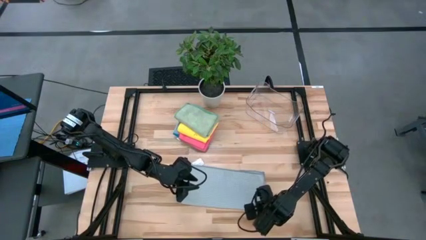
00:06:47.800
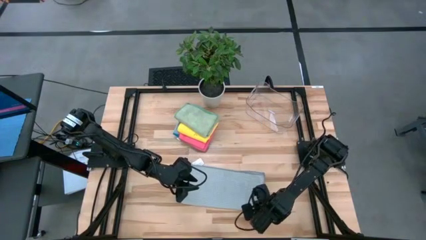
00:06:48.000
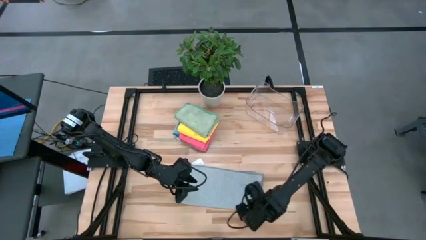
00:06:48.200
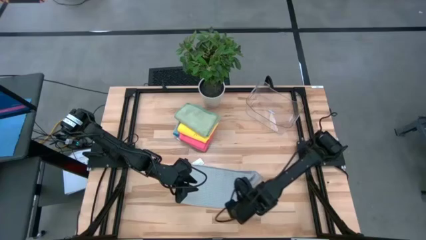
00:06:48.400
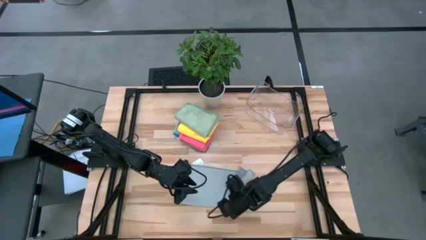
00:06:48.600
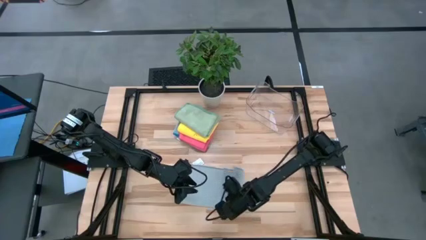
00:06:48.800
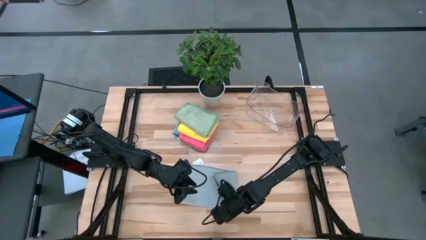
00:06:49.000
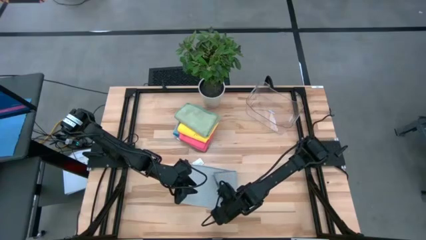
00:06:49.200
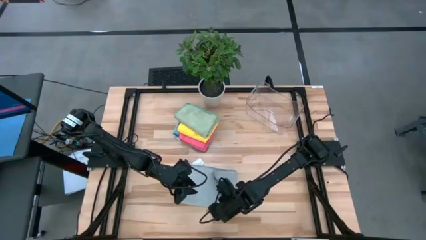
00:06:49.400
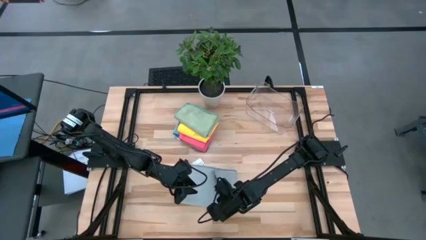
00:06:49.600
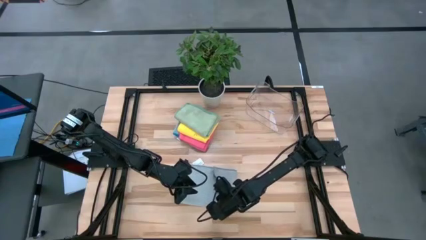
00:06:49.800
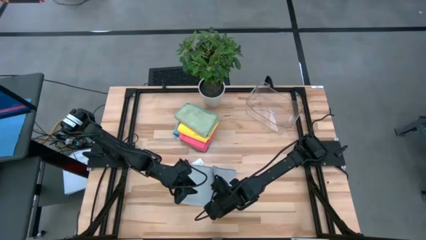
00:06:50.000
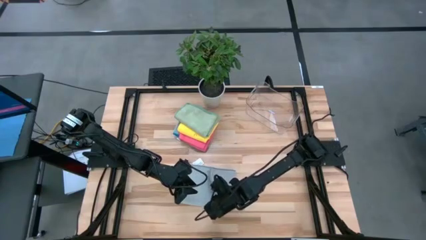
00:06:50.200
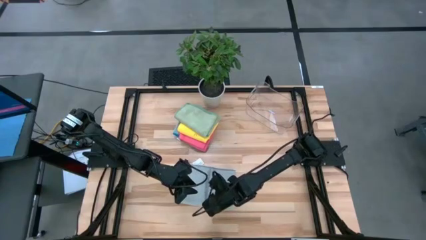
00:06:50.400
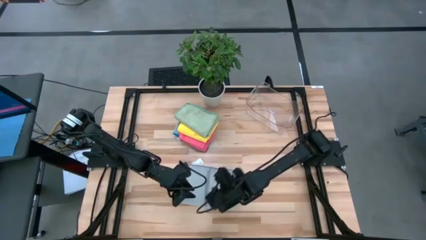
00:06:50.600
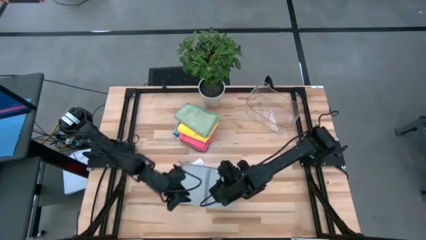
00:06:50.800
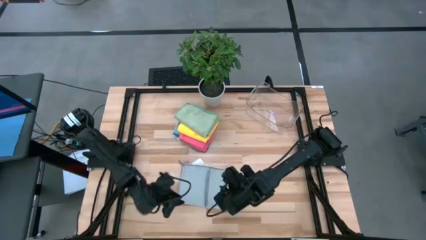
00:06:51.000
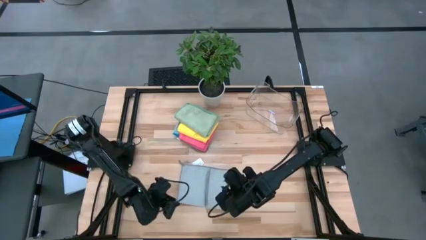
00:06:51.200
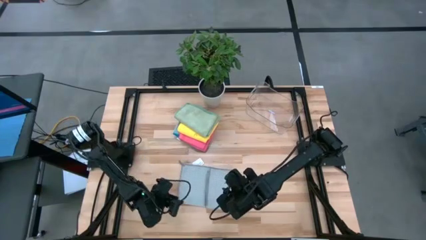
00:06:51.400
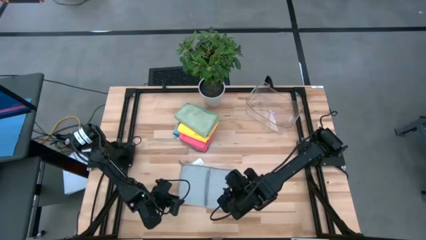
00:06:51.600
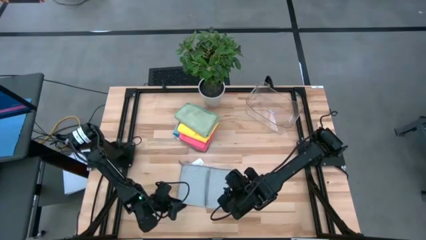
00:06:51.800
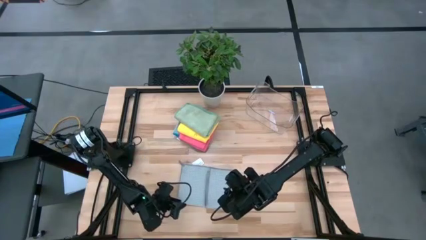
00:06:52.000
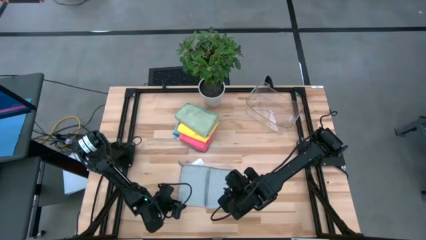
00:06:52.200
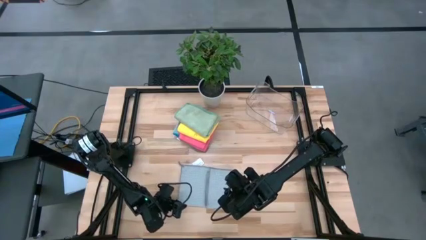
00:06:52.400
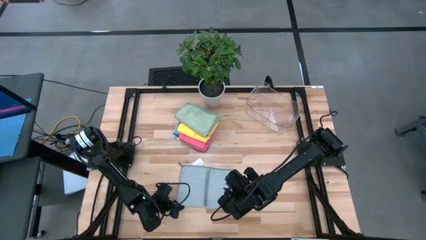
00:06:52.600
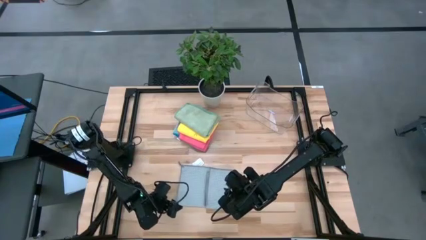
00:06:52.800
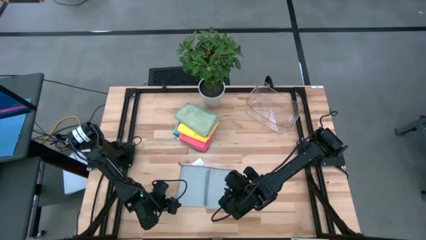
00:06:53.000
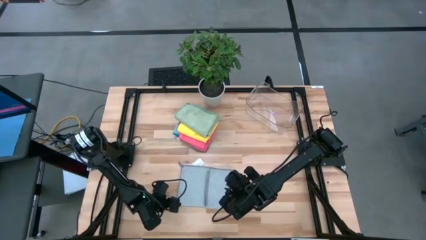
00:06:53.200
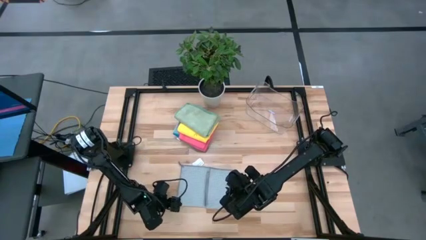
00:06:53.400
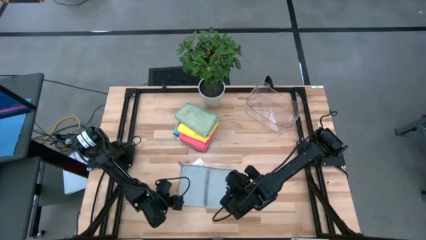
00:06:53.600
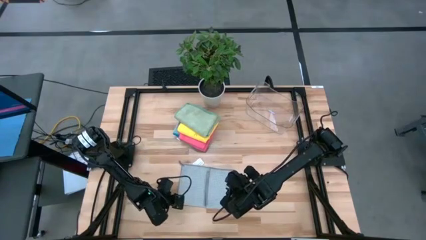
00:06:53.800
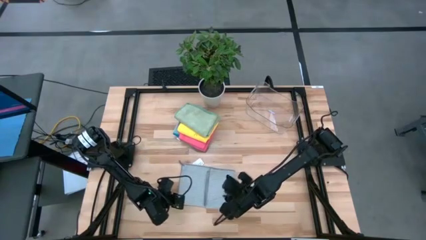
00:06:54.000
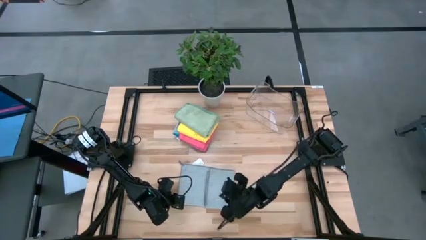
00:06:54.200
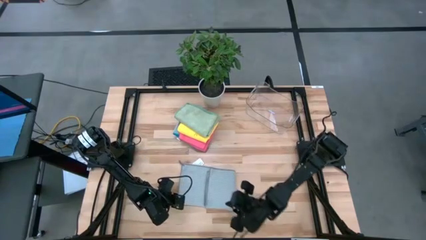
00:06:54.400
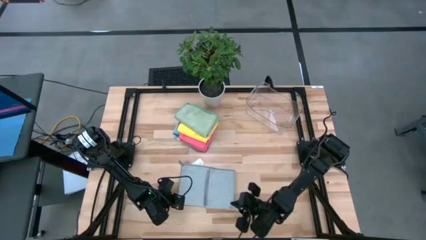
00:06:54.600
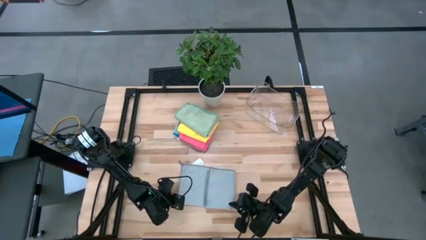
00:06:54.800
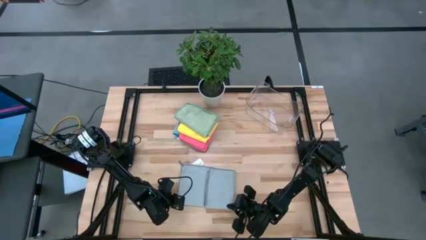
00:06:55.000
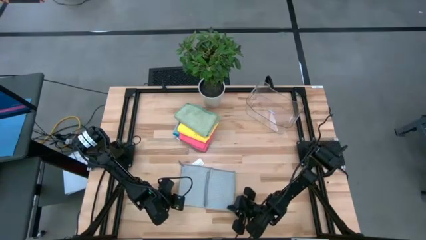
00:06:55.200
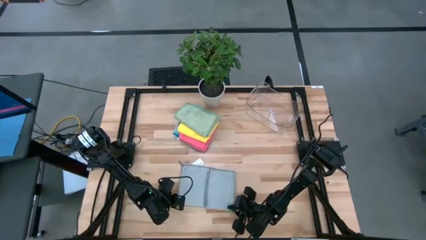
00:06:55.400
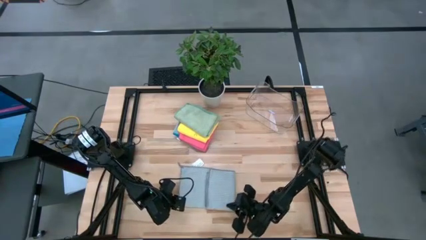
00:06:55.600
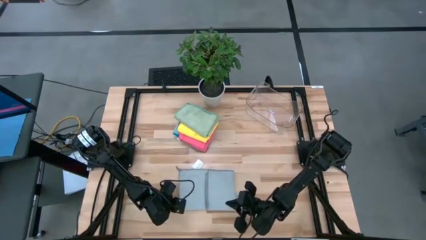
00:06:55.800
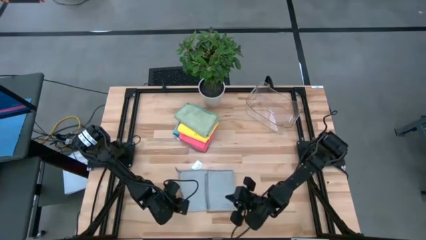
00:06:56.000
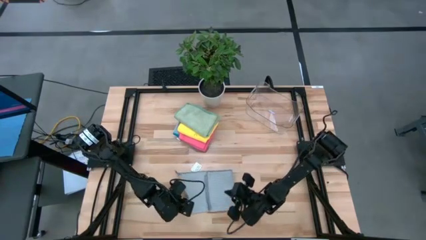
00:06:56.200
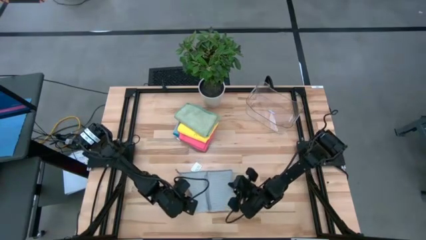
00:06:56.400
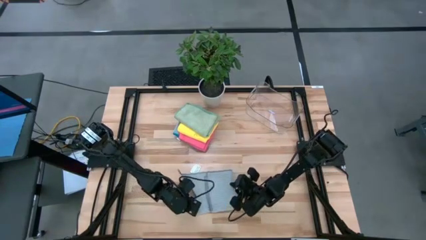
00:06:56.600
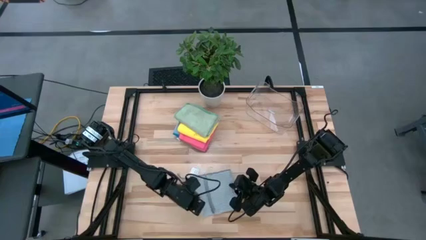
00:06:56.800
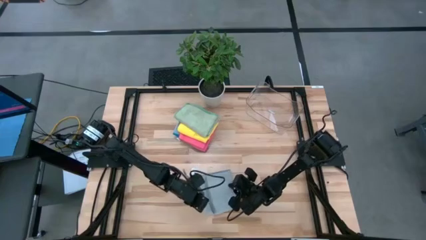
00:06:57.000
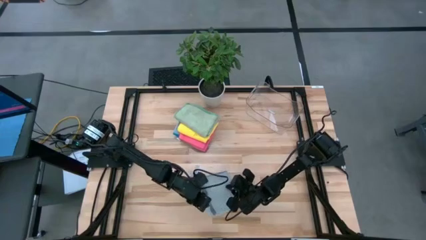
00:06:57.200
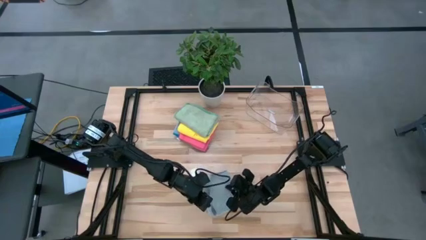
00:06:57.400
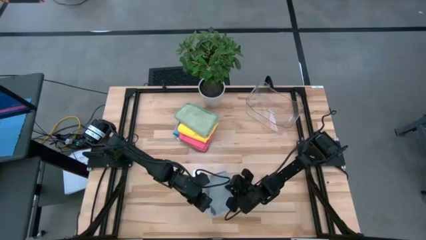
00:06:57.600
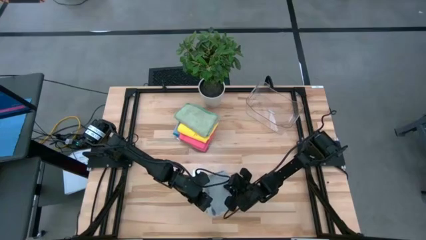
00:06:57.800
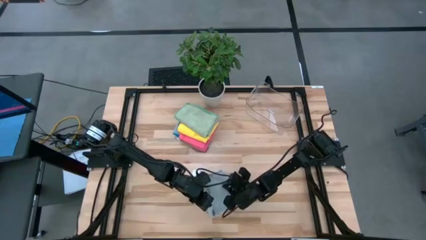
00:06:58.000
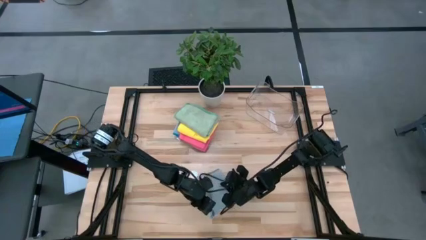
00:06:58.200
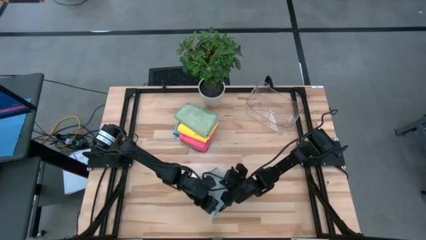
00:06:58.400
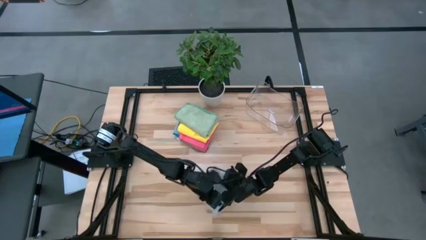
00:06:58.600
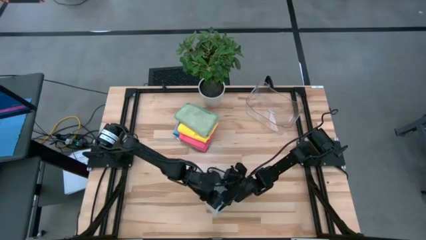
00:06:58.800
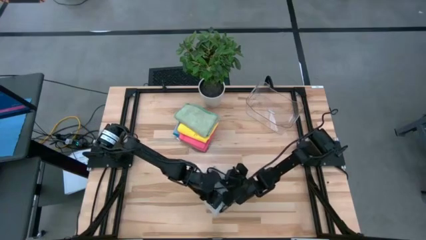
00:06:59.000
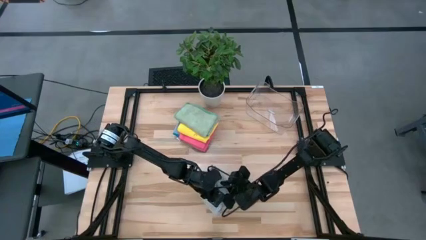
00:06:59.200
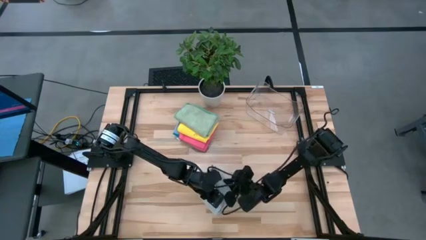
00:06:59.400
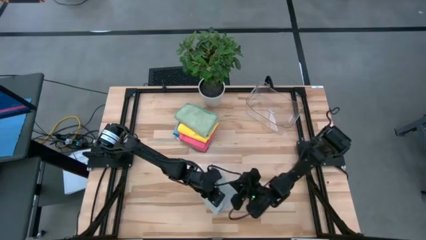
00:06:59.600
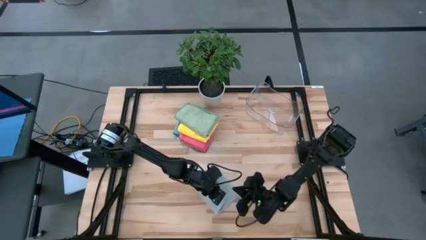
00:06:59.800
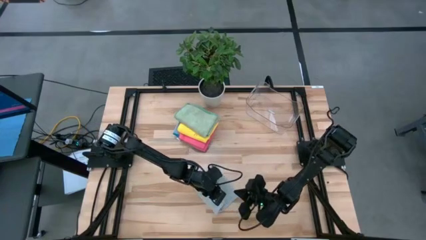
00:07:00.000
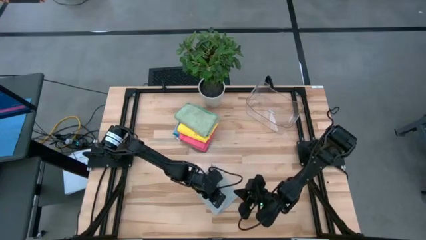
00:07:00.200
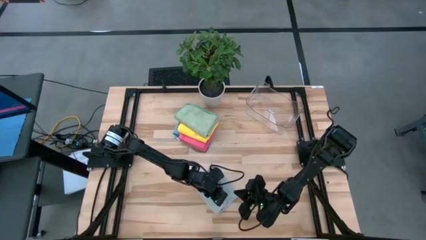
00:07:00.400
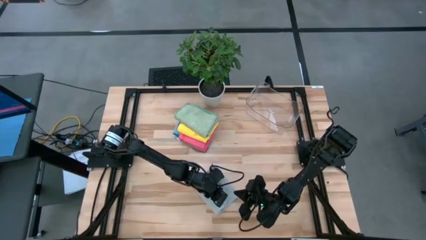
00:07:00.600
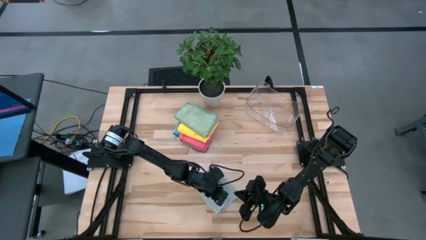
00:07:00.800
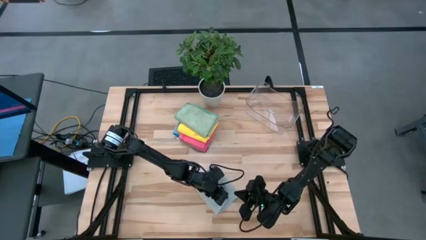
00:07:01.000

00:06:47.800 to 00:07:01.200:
Task: Fold microfiber towels
Fold the gray microfiber towel

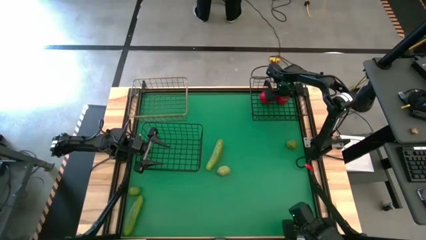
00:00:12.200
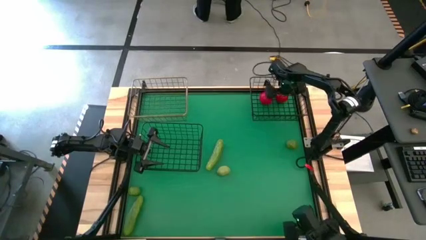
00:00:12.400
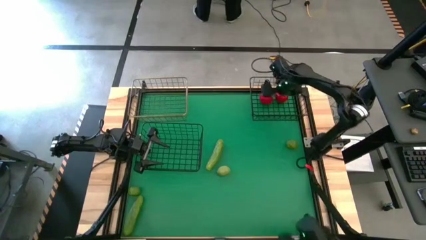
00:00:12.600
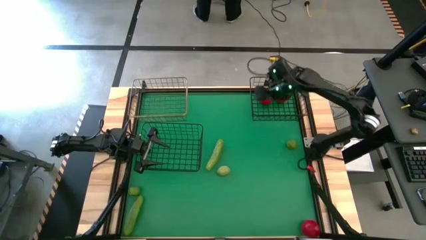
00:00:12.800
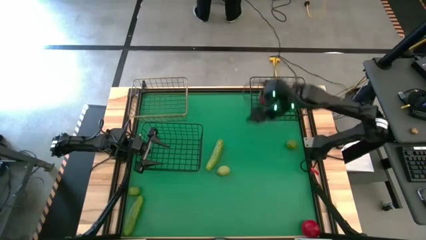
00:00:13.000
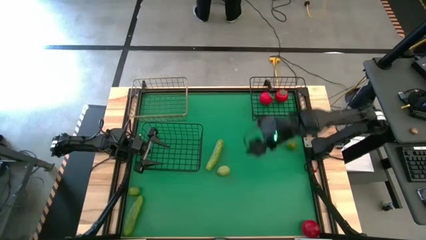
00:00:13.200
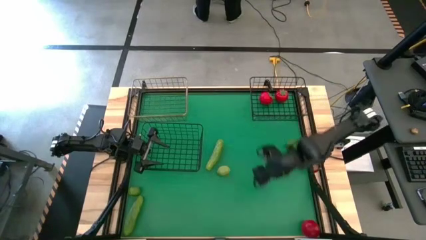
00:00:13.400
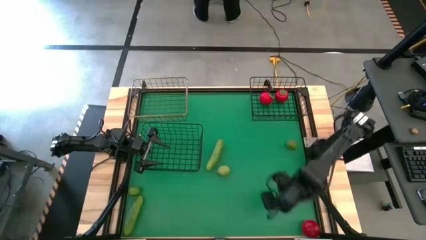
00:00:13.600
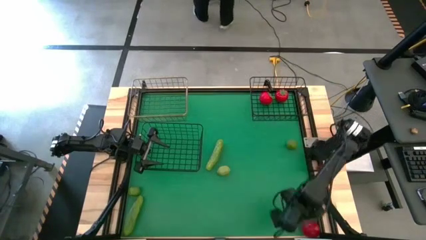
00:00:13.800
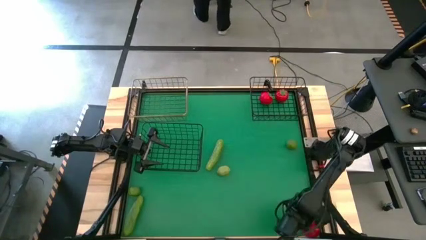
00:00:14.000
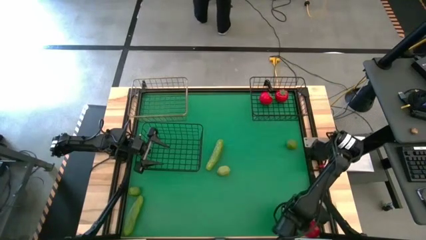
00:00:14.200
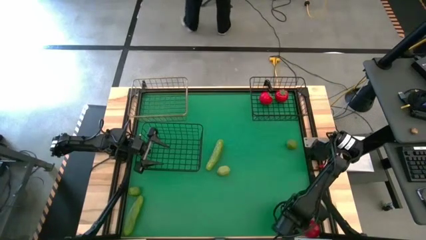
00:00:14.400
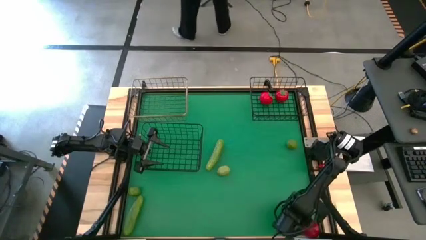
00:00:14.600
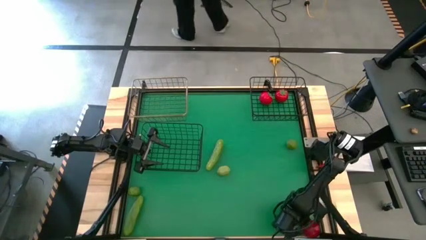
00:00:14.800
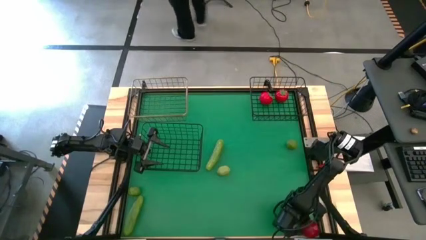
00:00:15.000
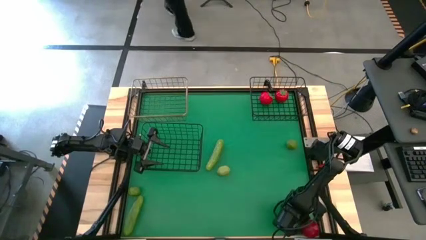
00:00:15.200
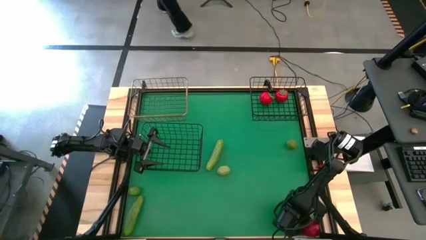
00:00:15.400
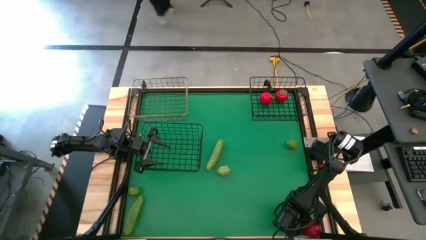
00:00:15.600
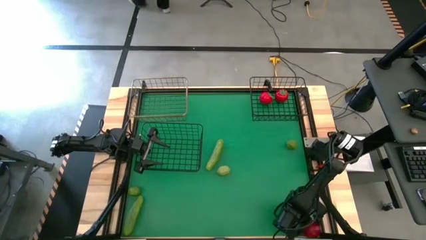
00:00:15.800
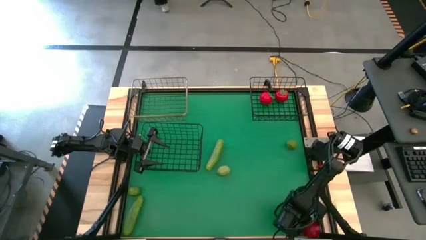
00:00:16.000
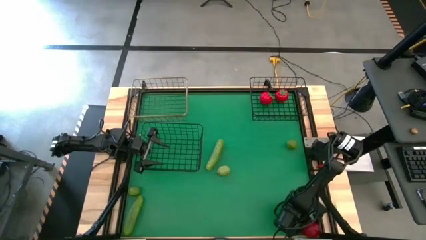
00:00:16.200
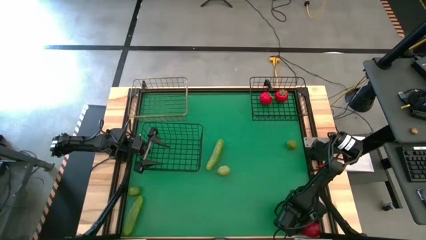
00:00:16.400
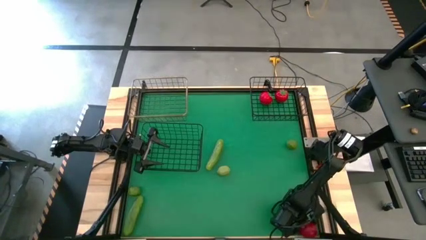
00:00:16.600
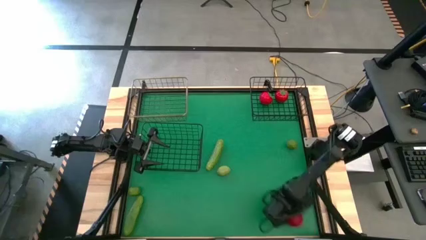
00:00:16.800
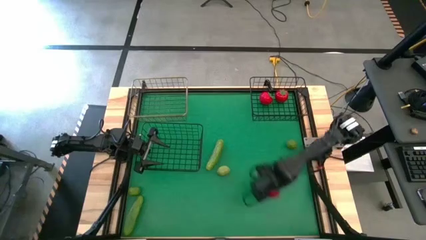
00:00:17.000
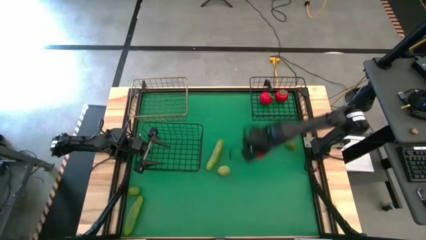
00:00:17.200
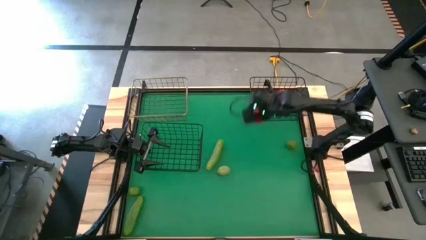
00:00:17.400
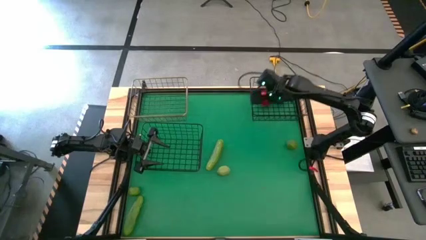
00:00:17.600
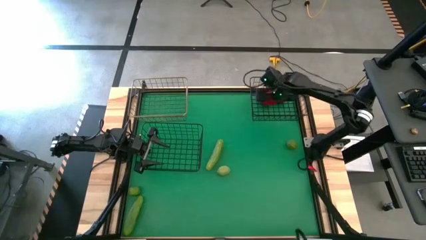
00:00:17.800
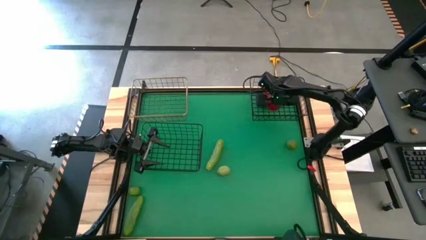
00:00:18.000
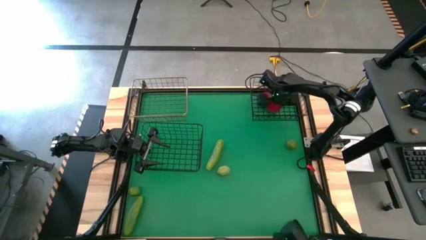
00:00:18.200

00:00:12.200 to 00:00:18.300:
Task: Sort produce into baskets
Put the tomato into the right black metal wire basket
